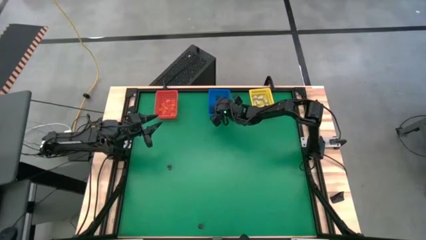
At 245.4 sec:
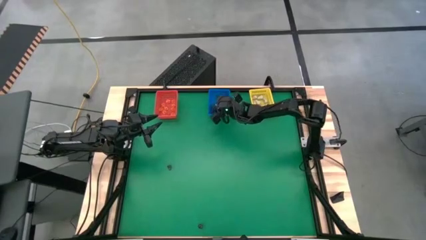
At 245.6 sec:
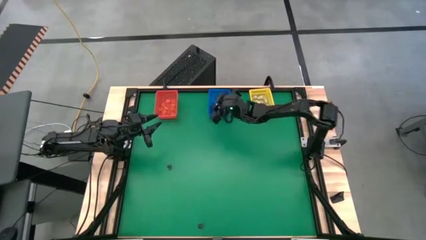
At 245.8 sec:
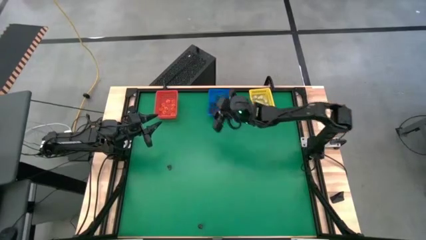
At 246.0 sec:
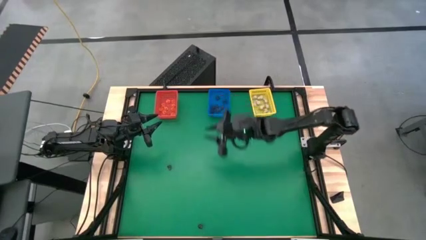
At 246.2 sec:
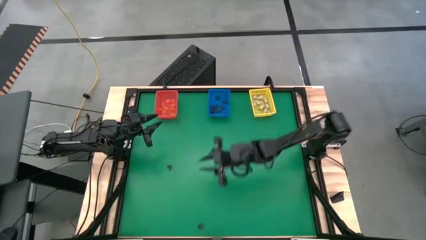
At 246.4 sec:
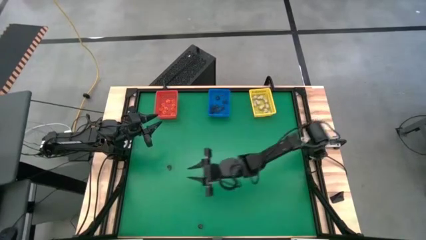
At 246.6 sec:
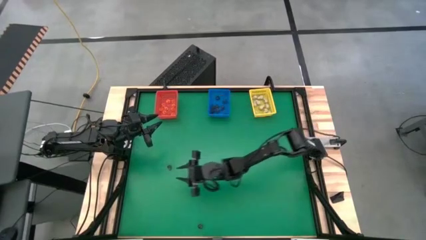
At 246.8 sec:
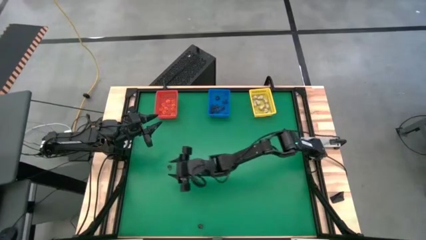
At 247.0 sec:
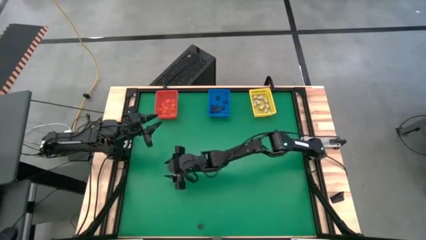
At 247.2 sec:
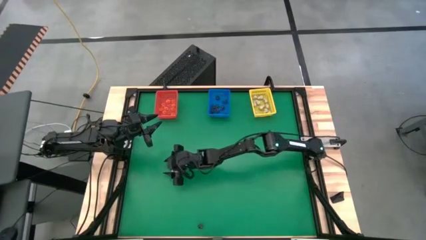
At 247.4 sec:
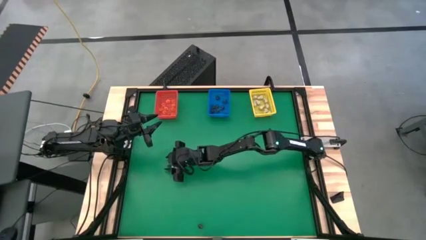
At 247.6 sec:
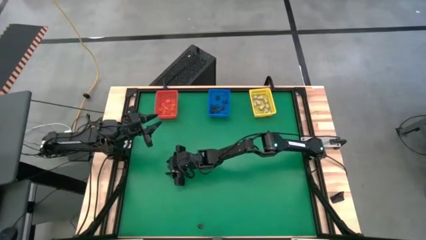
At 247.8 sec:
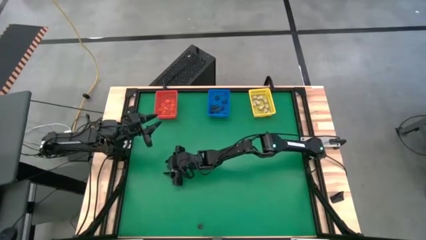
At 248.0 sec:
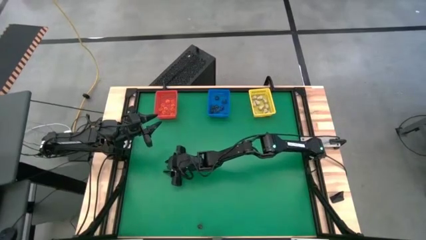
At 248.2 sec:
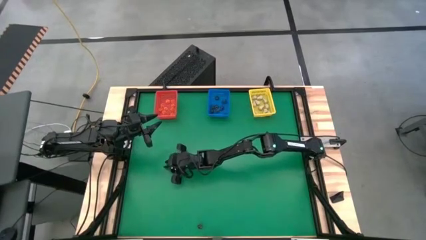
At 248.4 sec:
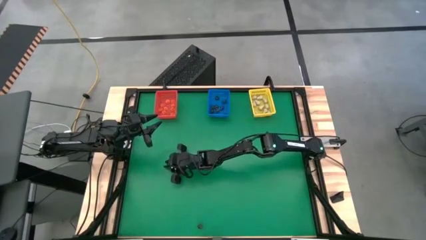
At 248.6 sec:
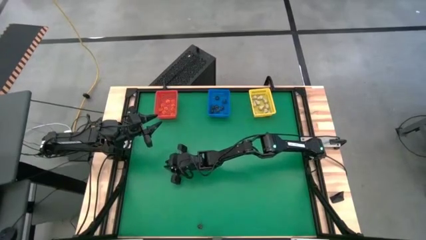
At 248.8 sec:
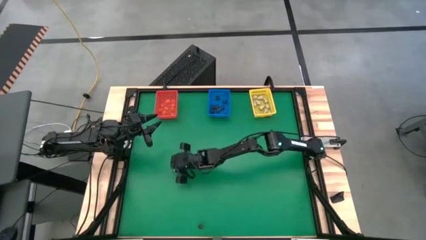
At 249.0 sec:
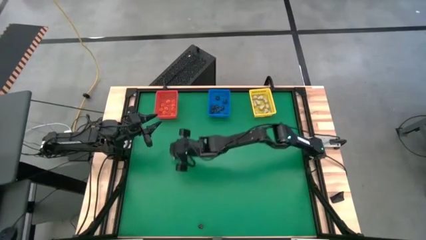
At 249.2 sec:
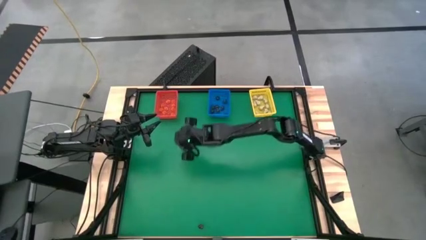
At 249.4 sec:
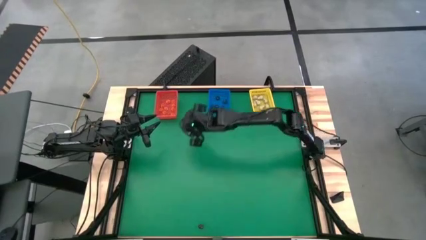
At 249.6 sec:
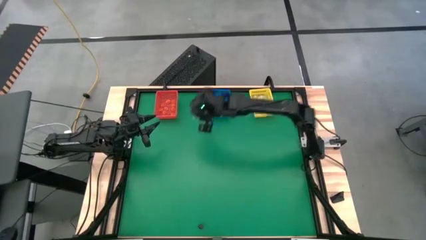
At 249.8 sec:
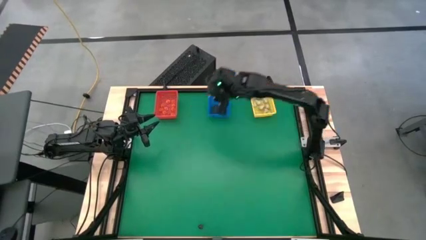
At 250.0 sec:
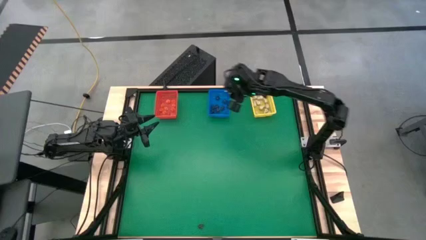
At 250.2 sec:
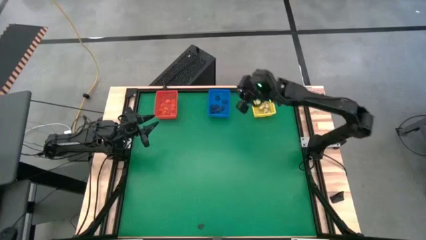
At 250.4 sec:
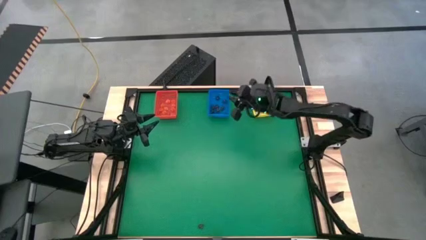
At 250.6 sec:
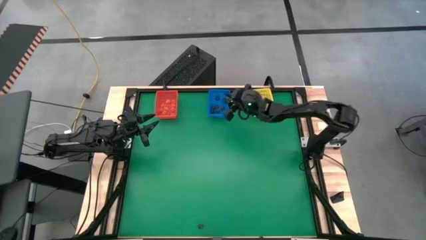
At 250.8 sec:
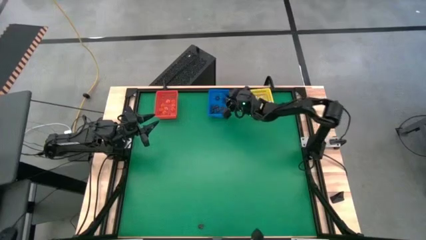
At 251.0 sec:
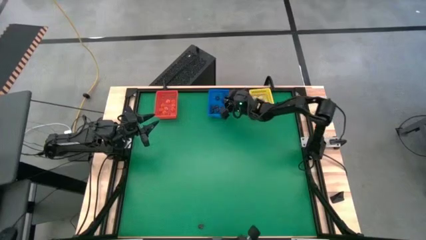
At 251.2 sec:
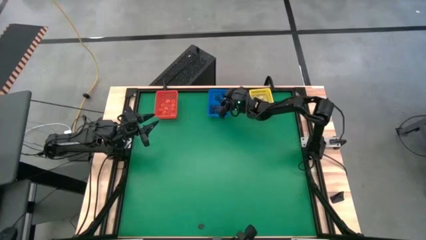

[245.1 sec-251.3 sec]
Task: Sort Halloween decoration
Put the black skull toy into the blue bin

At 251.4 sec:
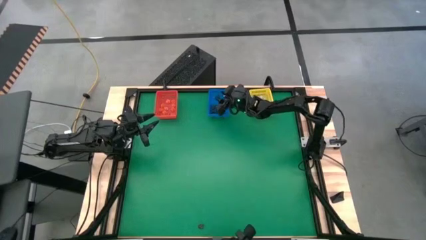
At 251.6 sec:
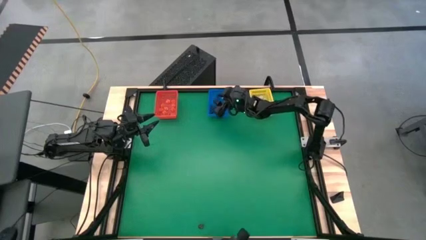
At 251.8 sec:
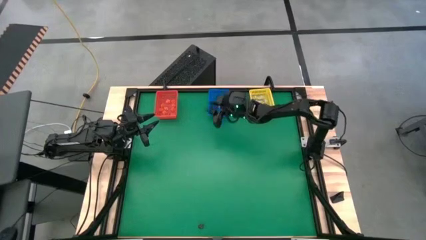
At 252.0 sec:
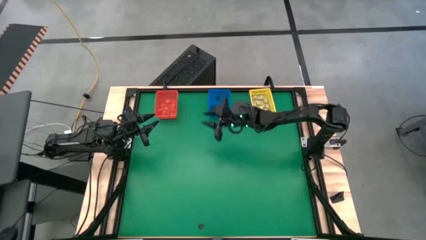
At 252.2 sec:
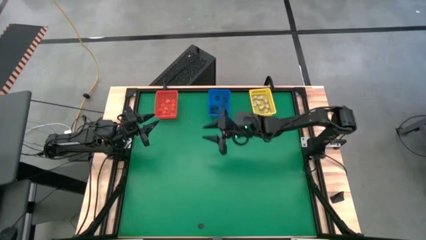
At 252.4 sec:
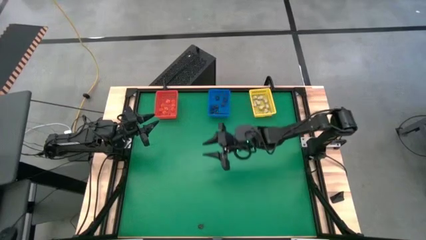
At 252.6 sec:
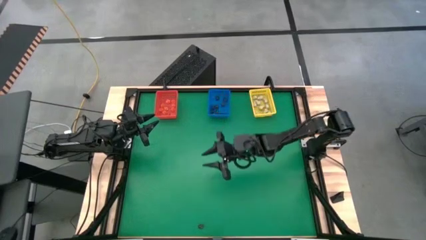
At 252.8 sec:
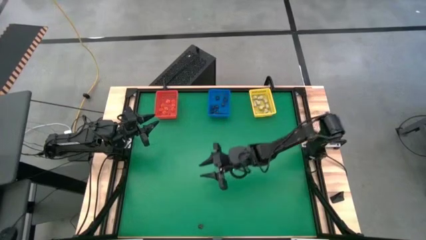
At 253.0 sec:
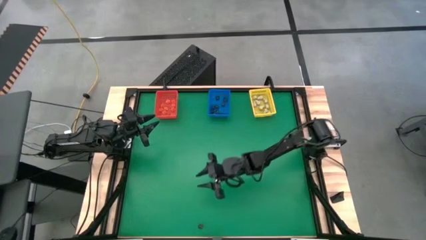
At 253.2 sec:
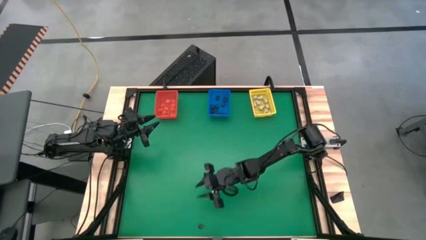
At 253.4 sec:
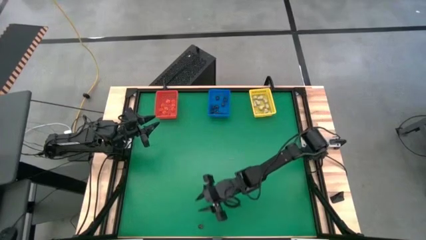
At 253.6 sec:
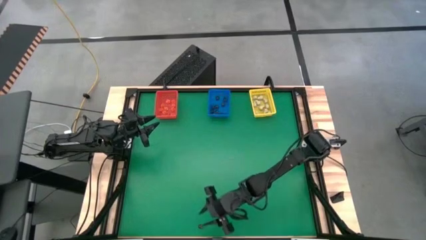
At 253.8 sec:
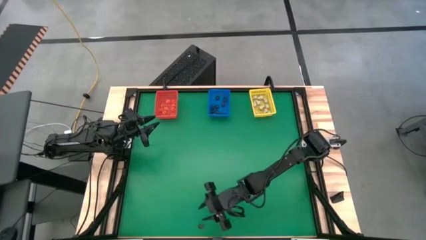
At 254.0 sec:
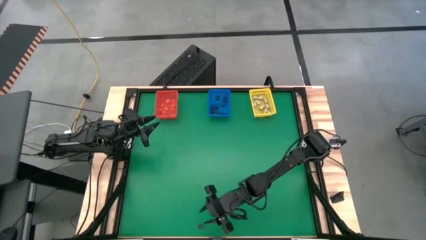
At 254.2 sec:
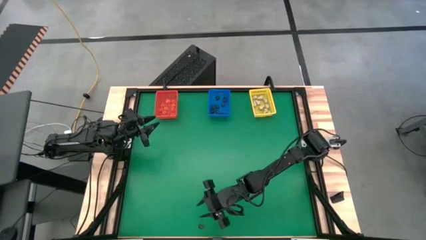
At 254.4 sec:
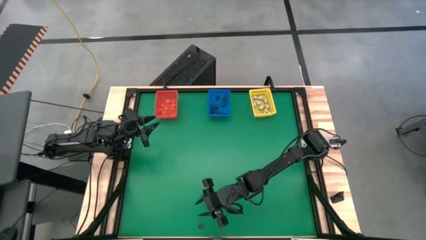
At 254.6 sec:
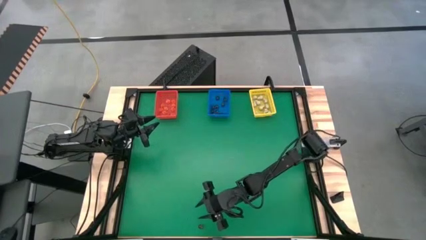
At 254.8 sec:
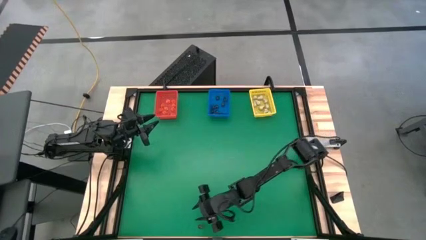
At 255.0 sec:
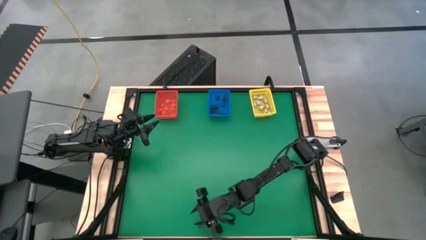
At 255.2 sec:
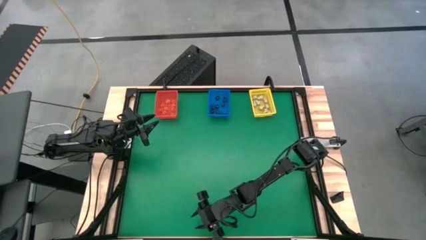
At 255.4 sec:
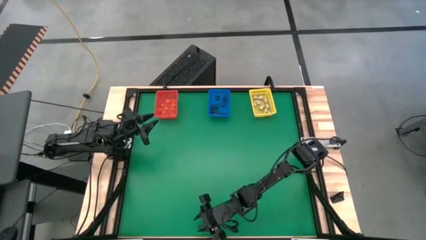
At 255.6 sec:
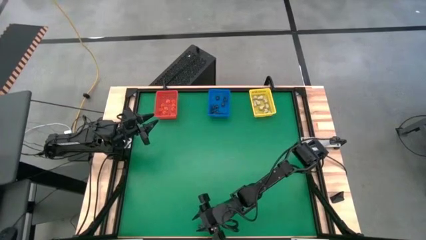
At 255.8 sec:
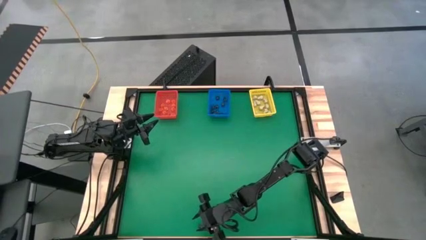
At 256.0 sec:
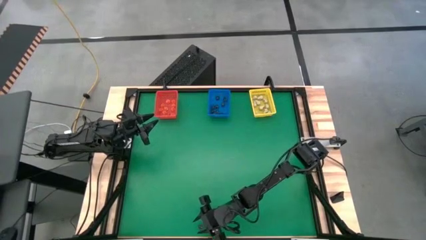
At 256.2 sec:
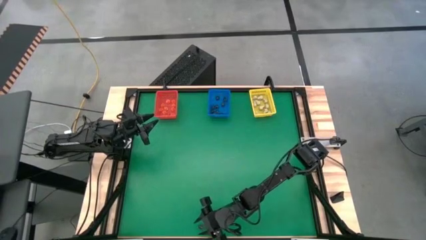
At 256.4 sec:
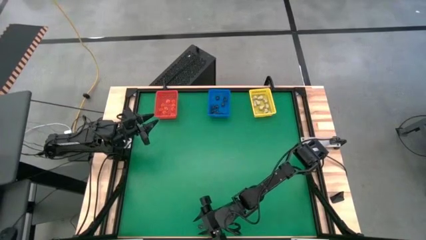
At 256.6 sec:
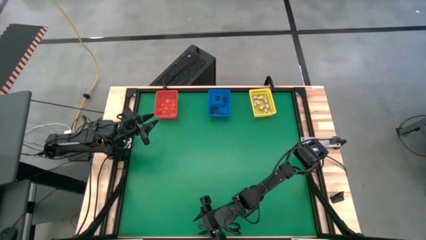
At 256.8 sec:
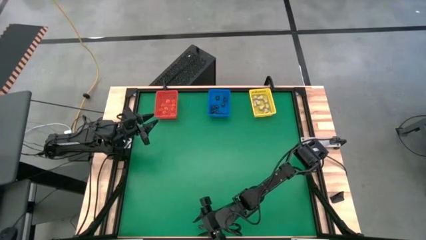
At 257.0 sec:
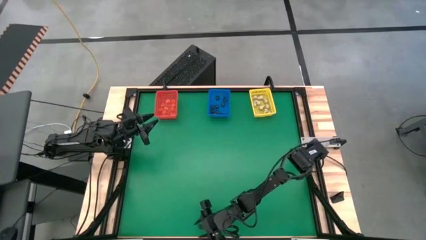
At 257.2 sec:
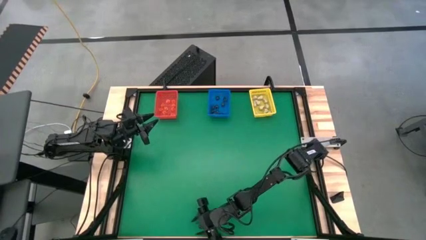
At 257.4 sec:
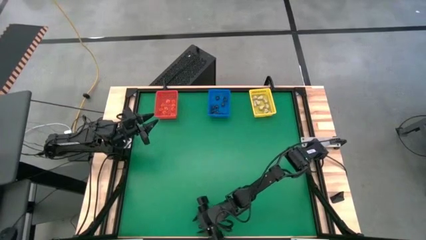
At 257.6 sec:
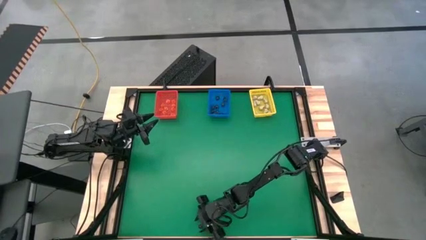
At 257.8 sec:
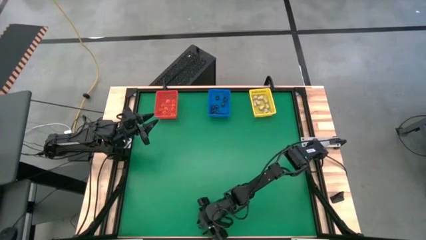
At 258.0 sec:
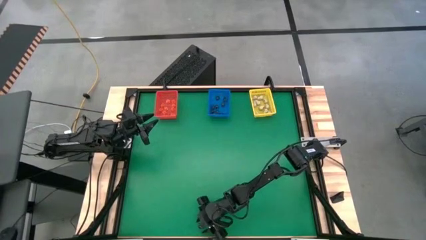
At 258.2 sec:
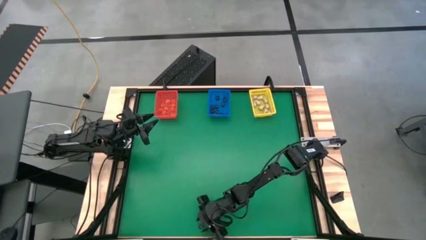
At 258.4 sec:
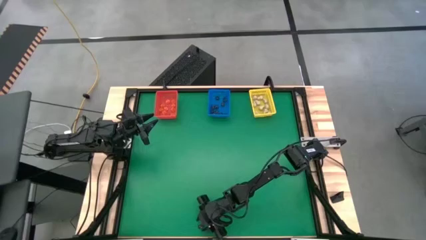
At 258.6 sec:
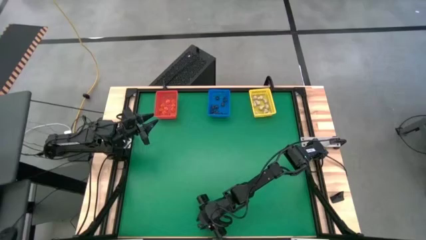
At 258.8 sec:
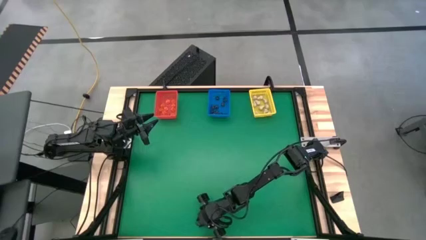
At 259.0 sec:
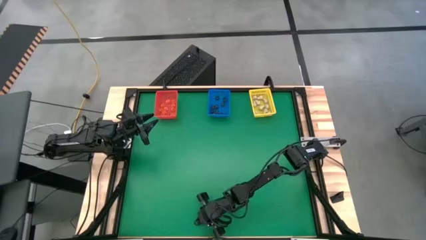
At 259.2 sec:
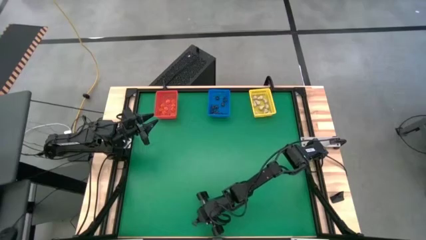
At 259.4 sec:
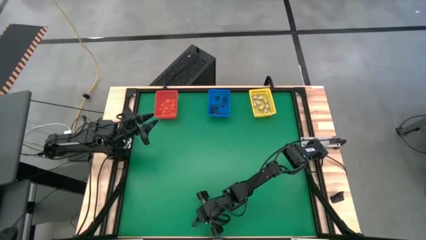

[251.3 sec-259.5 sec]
Put the black skull toy into the blue bin
